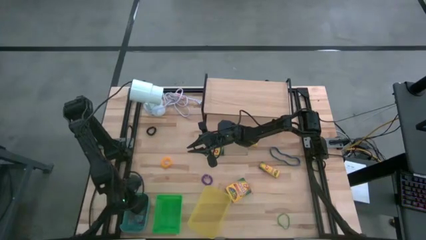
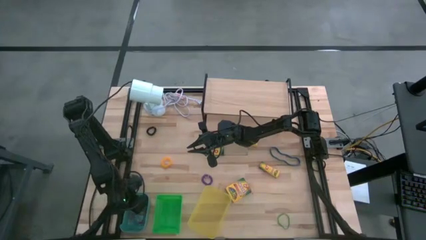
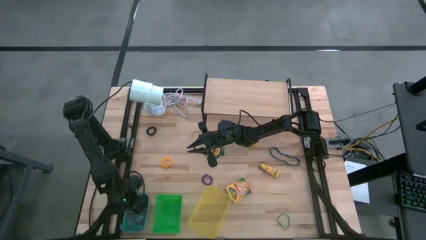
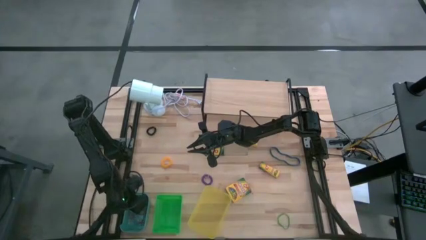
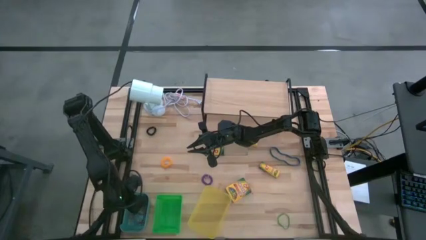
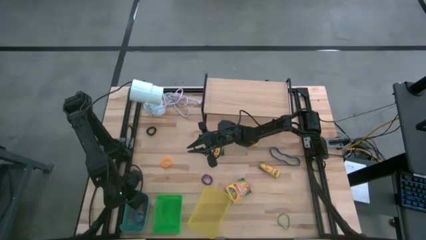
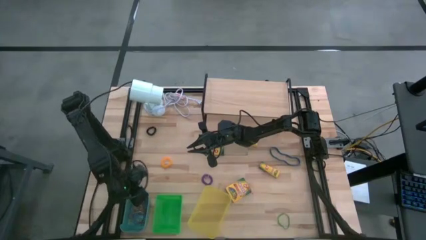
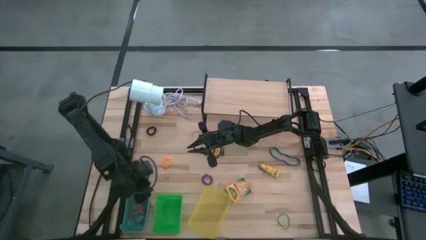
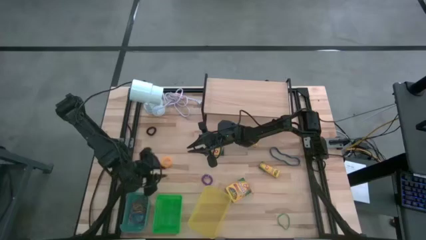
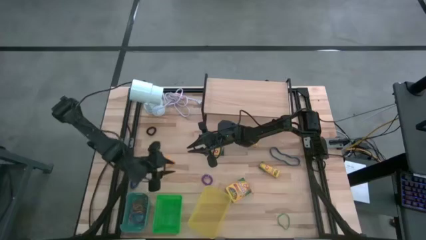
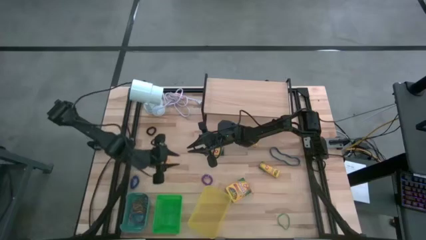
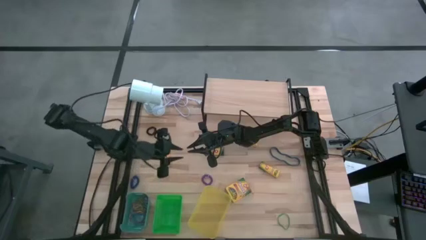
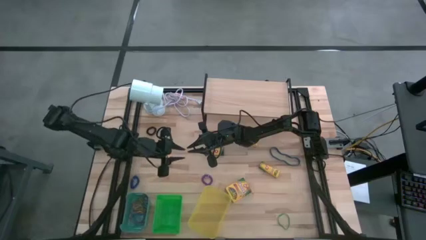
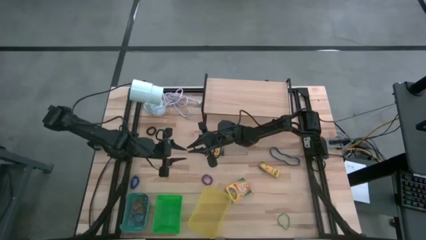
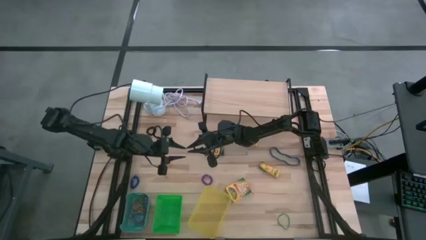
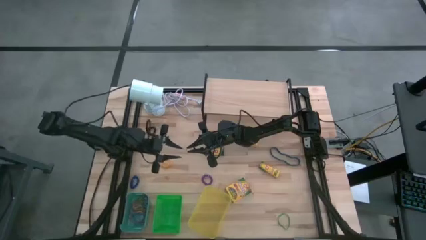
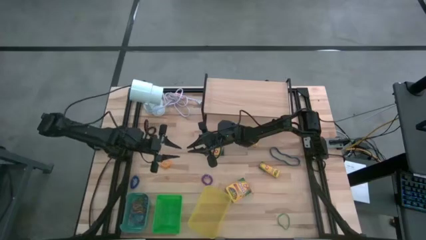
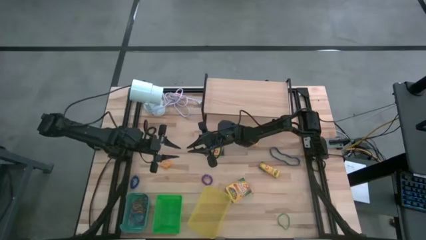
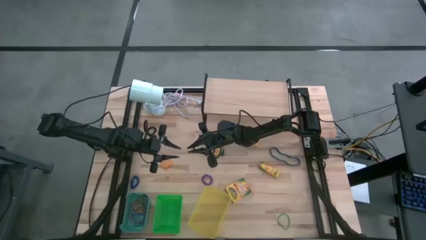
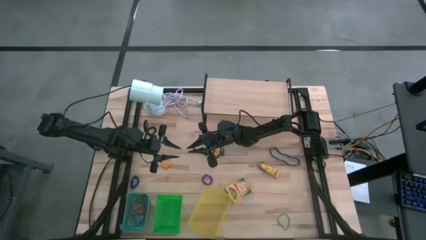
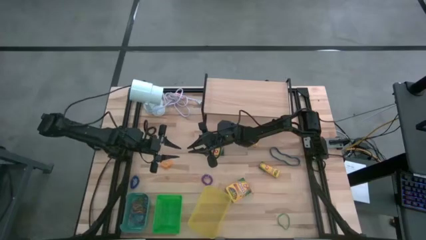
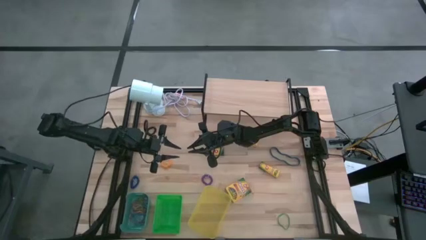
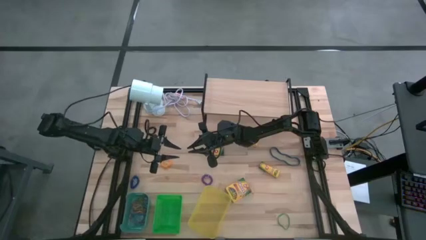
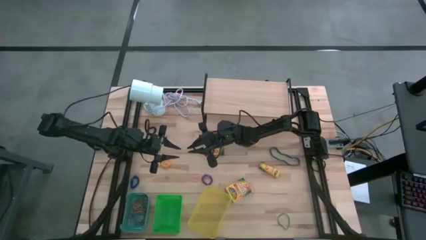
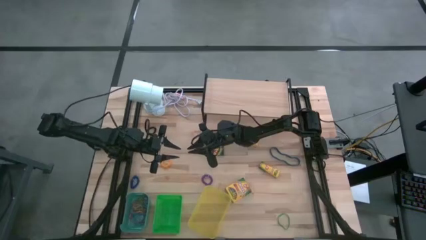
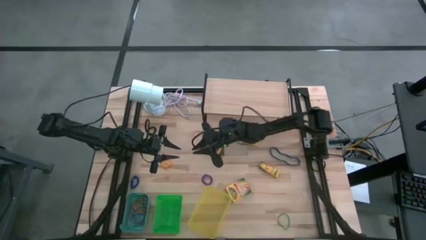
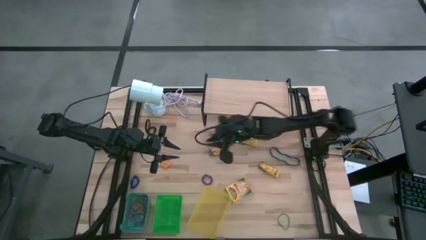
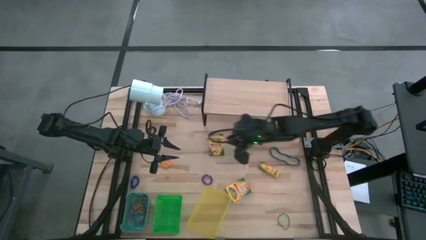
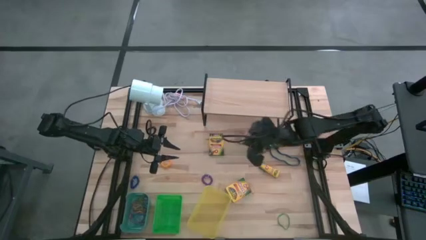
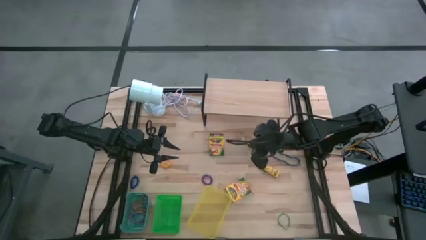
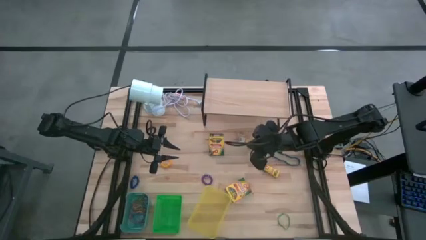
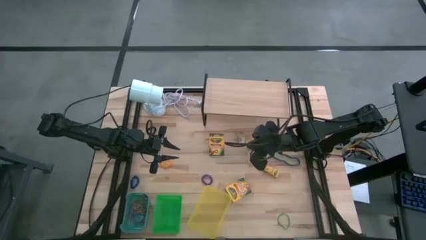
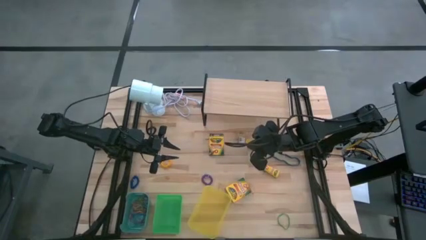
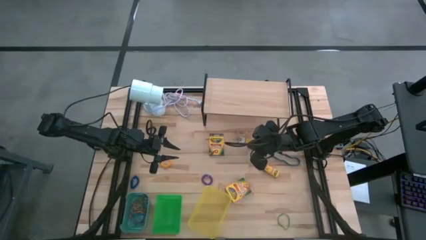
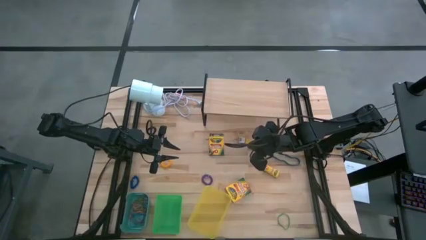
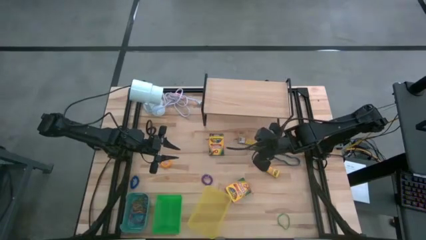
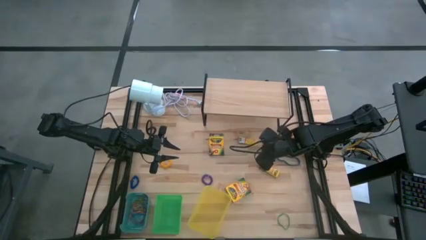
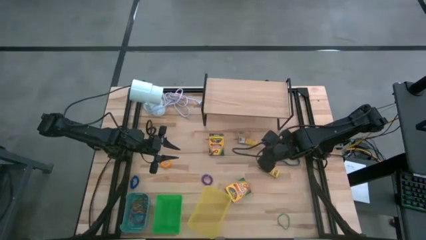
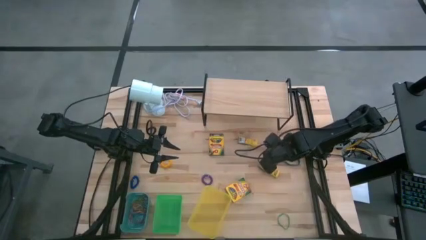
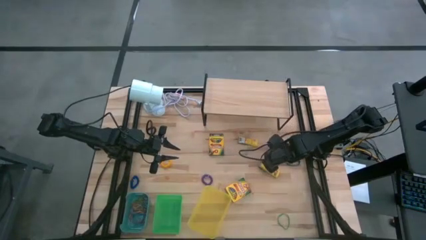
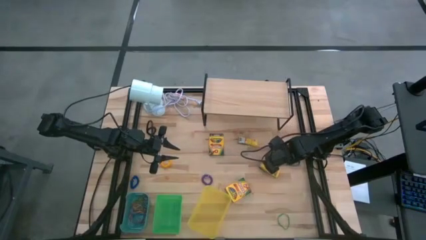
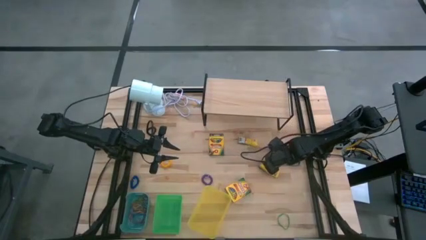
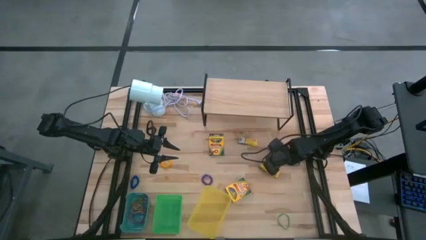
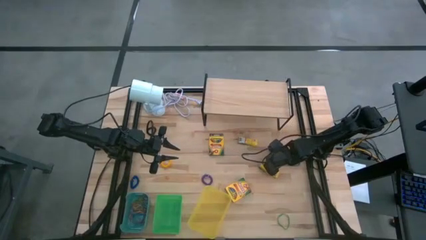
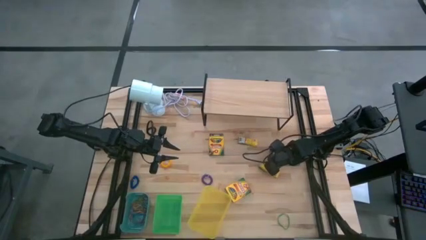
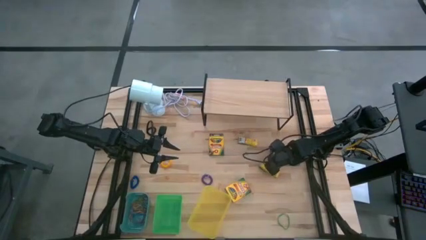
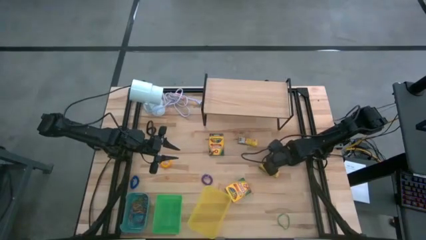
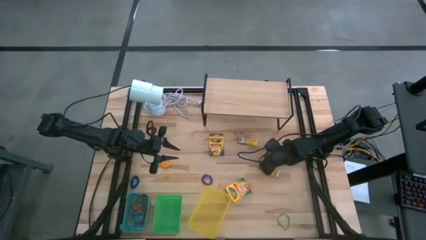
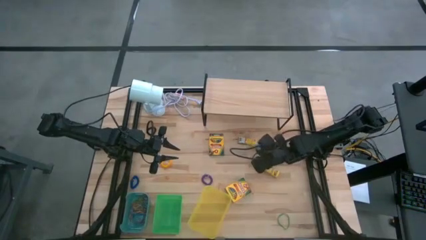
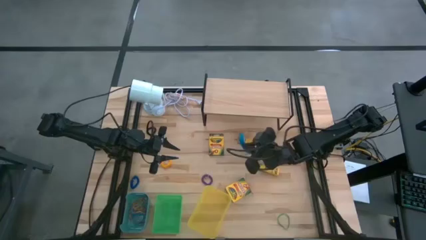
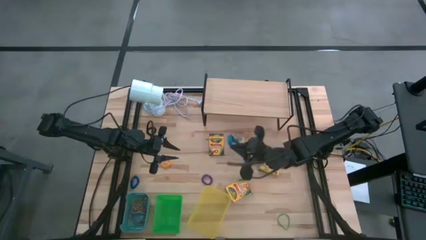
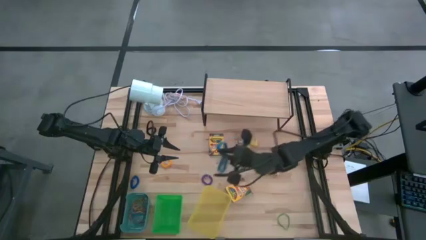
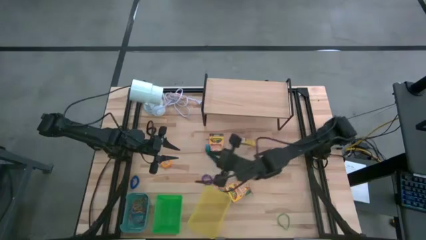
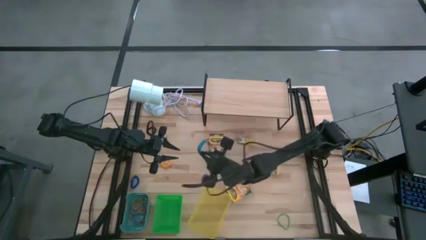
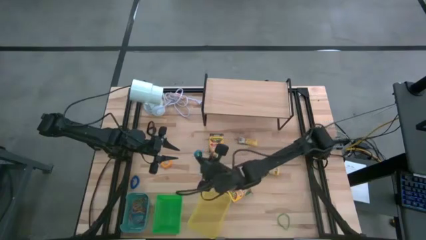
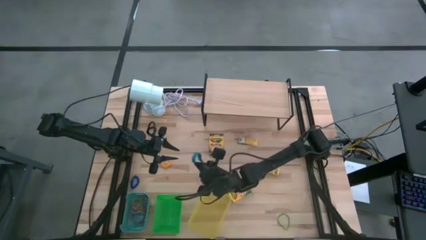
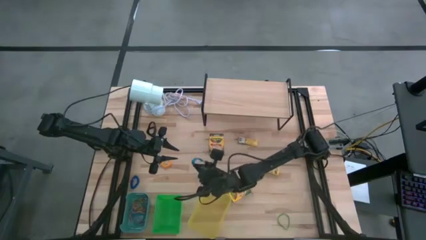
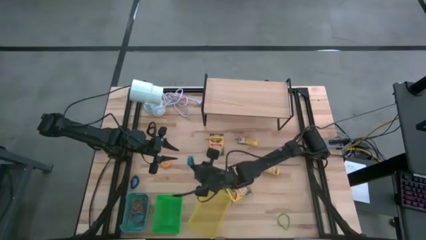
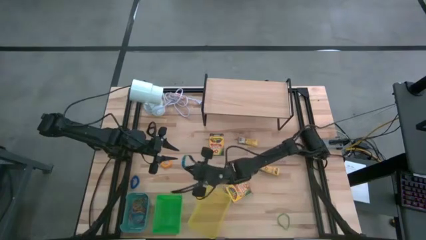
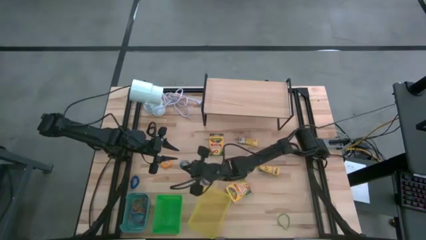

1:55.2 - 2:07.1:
Task: Pick & Place Office Desk Supplies
Put the blue rubberband into the blue bin
